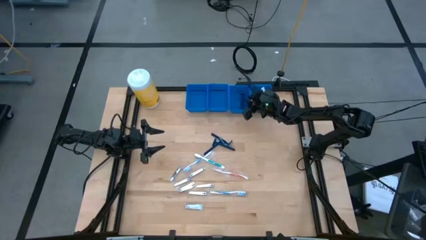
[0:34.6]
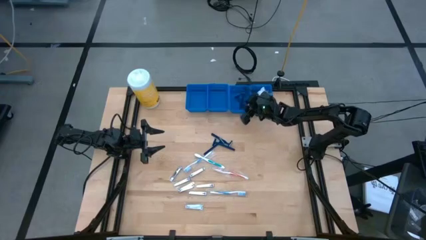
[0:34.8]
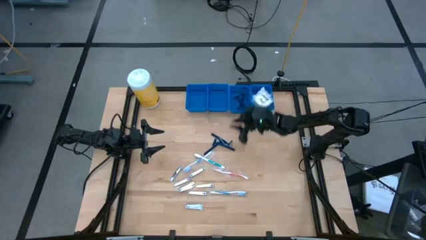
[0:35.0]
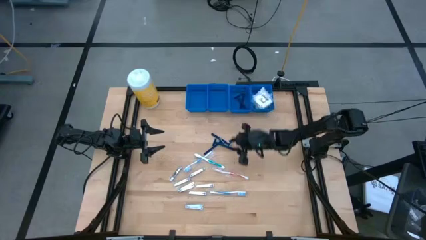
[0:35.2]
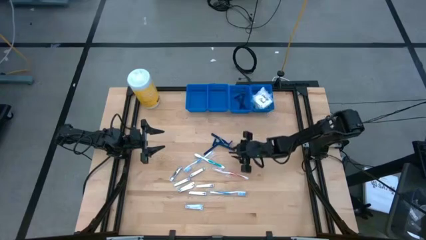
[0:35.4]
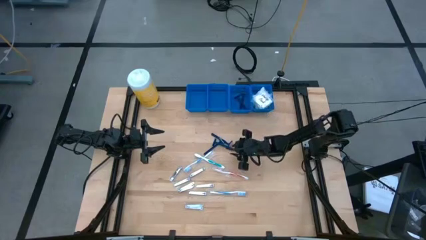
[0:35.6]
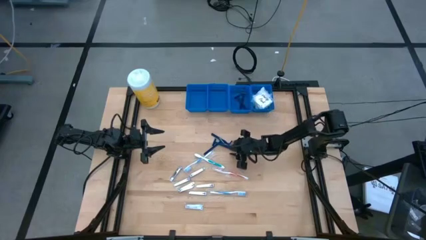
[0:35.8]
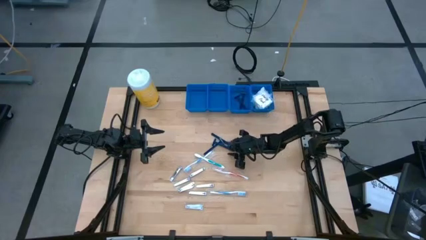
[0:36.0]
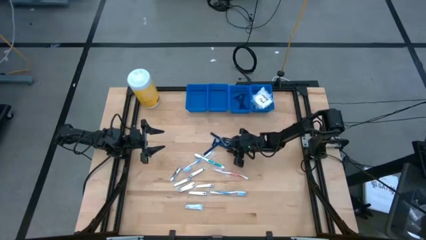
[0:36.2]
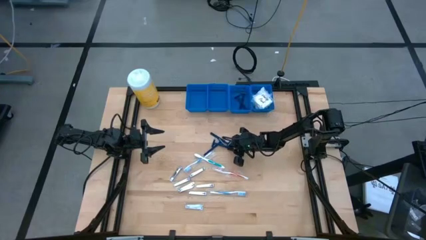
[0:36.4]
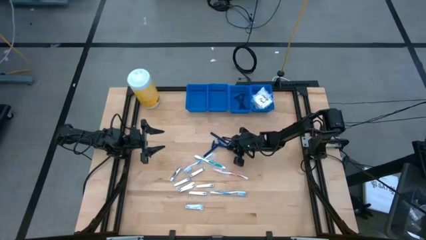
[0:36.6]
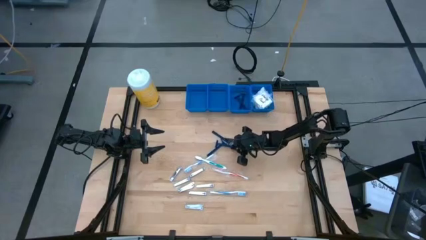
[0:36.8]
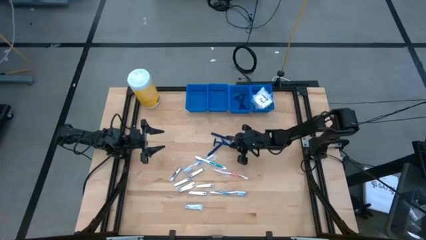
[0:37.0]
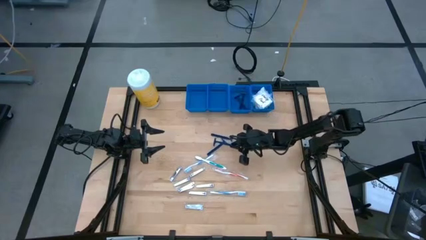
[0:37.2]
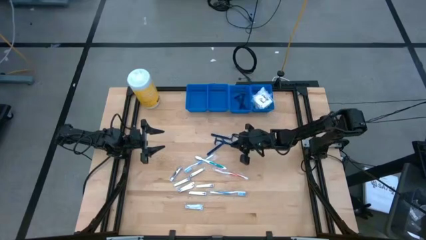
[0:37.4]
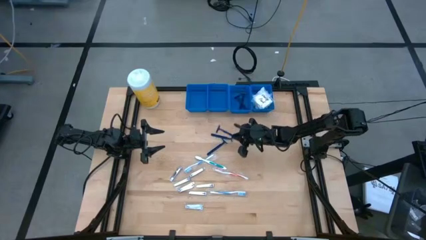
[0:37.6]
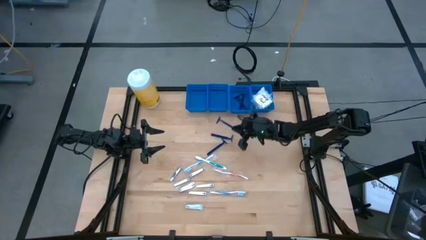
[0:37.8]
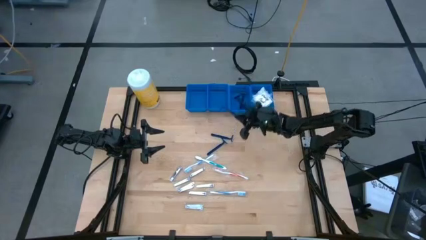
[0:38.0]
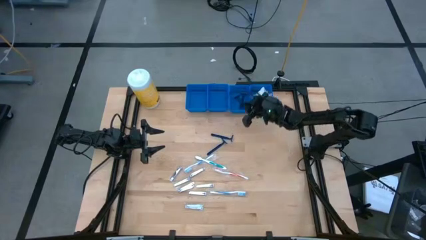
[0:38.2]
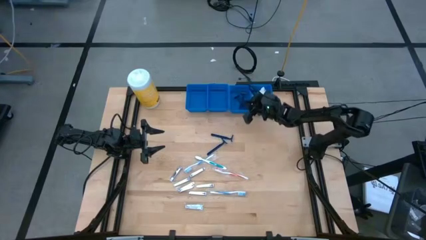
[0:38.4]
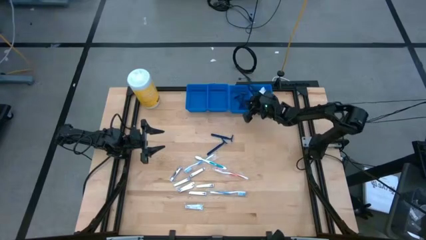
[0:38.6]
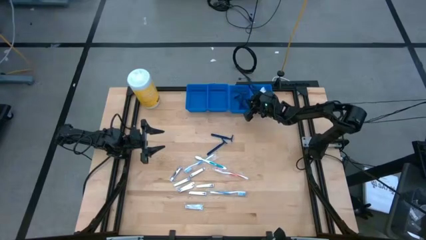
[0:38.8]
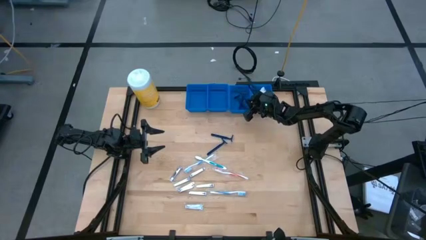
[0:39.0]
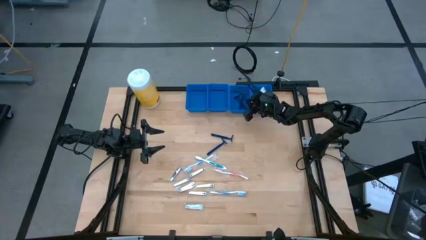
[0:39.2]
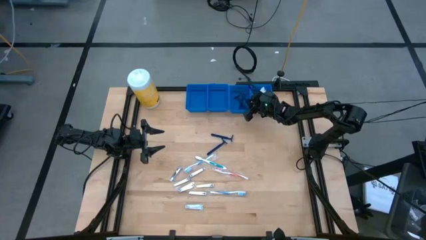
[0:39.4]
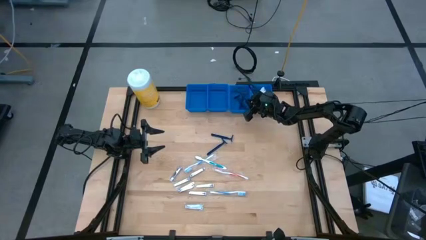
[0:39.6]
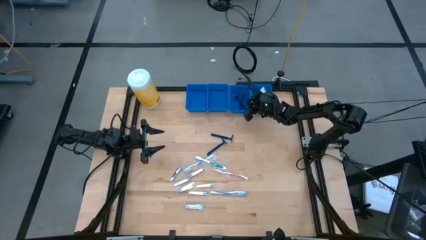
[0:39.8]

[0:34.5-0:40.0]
Task: Pick & Place Travel size toiletries
Put the blue razor into the middle right blue basket

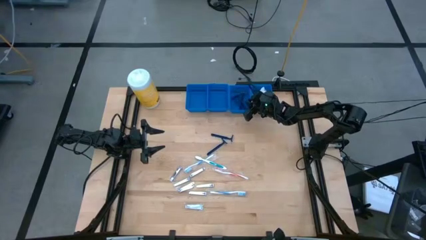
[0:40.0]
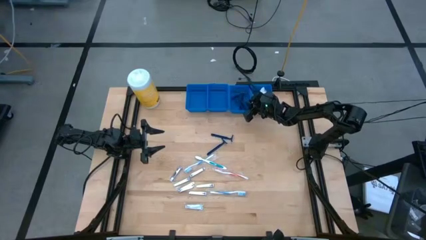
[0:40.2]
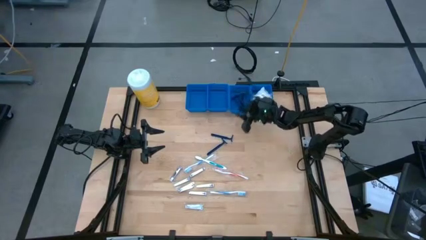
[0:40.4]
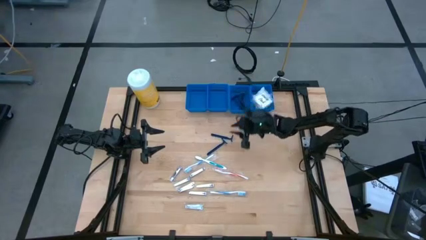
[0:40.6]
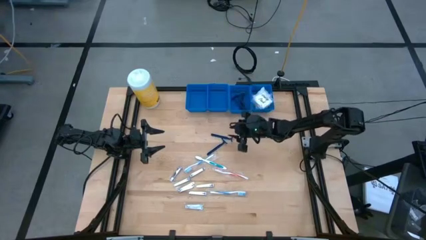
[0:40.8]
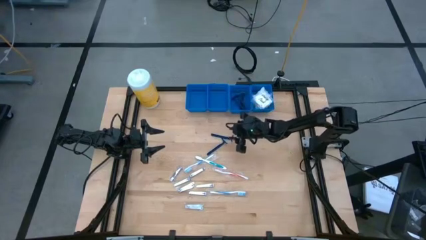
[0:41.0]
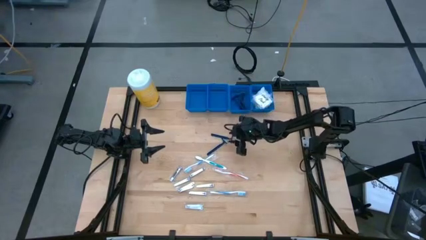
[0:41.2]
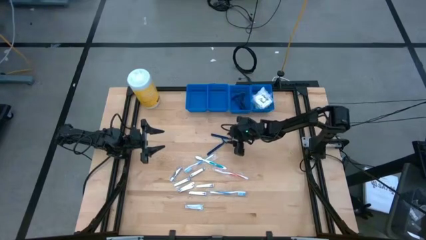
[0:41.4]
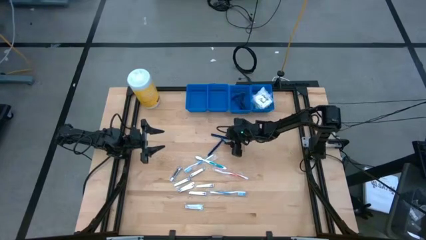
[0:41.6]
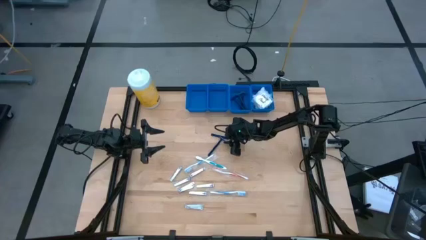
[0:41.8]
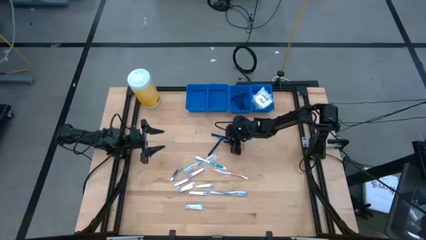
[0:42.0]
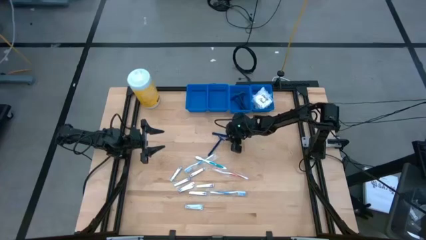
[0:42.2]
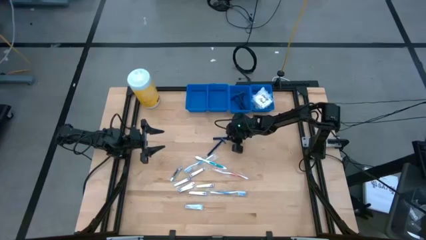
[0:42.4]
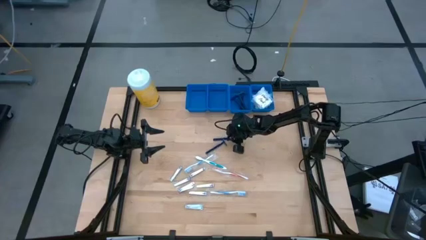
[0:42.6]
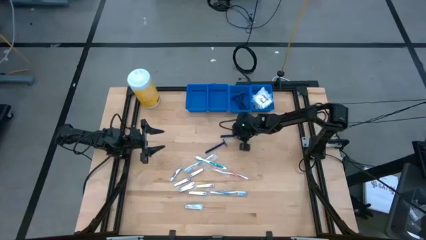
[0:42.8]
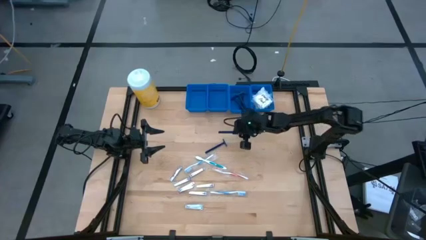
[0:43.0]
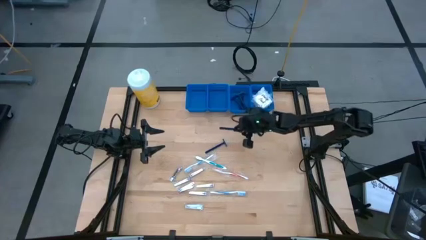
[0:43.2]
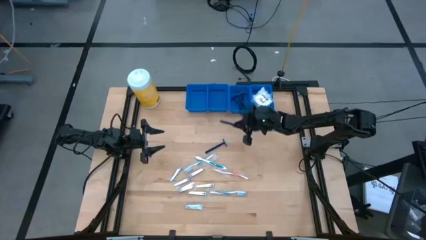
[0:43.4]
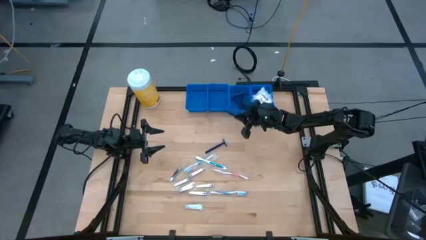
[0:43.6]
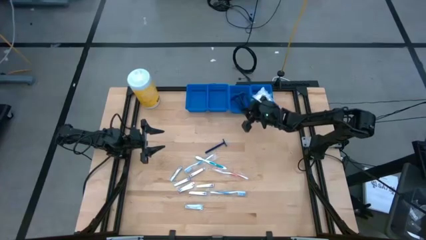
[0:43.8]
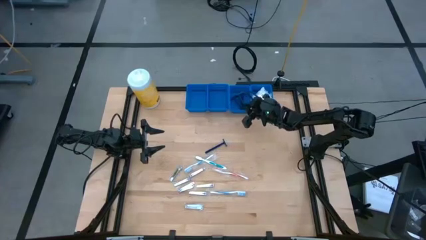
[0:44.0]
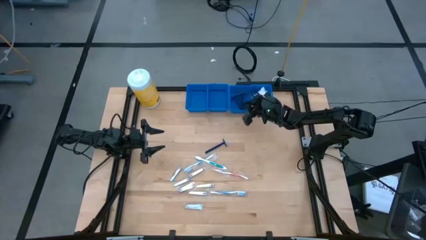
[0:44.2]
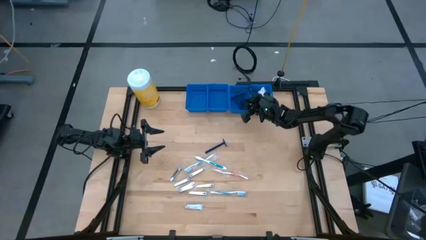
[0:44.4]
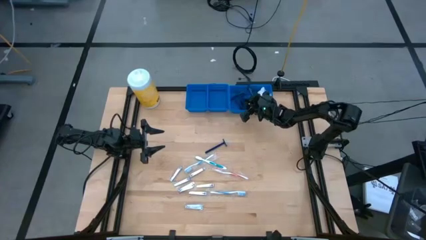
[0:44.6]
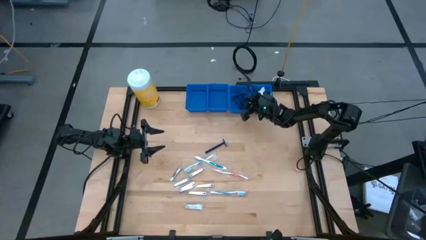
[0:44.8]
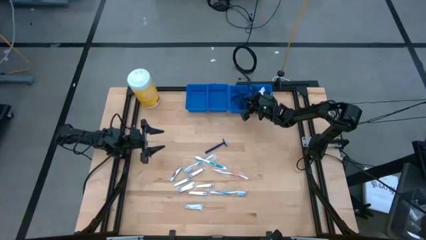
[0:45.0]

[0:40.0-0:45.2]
Put the blue razor into the middle right blue basket

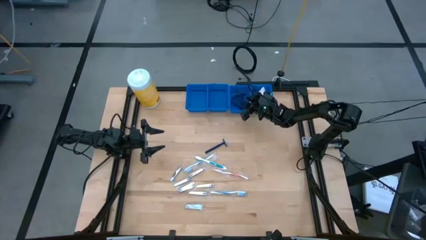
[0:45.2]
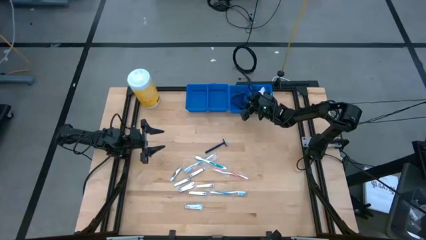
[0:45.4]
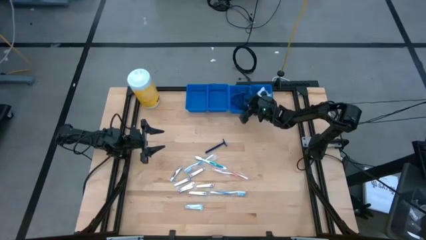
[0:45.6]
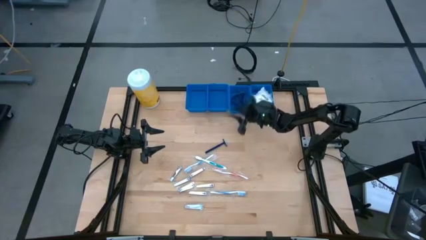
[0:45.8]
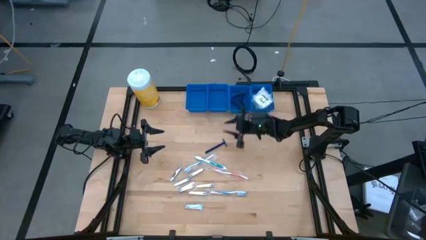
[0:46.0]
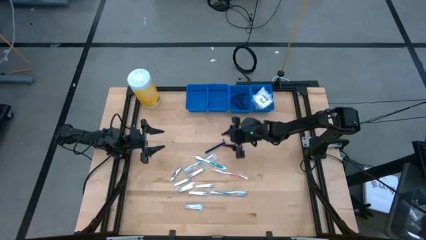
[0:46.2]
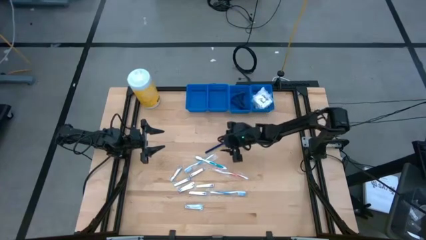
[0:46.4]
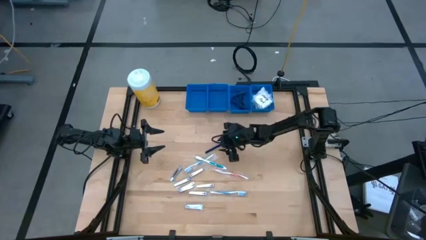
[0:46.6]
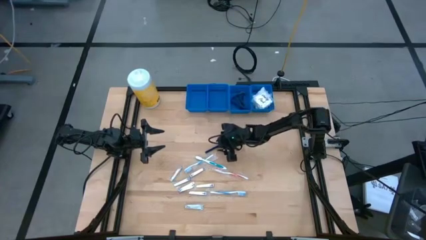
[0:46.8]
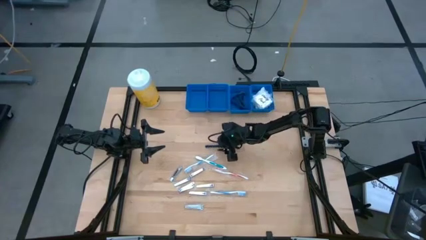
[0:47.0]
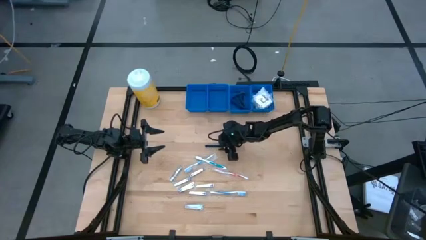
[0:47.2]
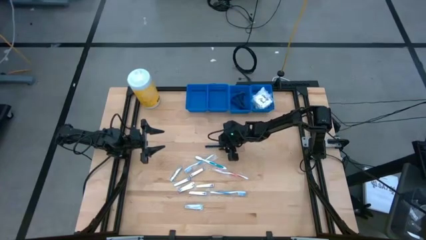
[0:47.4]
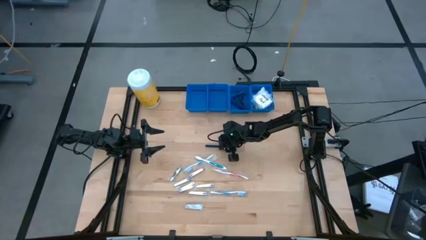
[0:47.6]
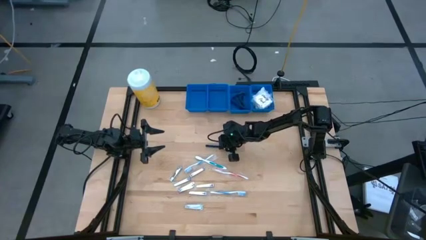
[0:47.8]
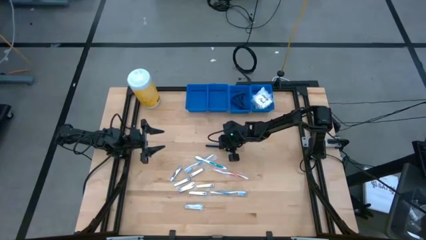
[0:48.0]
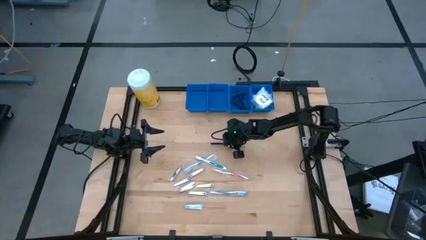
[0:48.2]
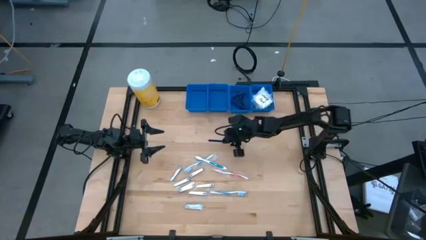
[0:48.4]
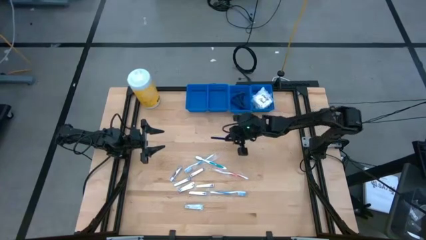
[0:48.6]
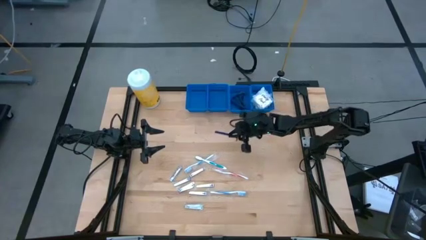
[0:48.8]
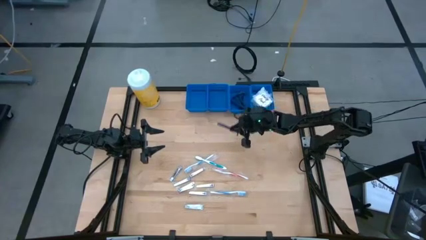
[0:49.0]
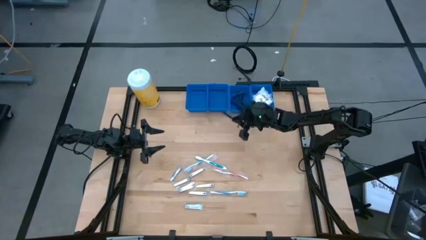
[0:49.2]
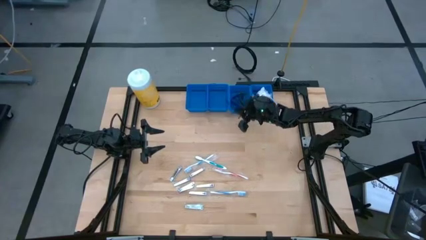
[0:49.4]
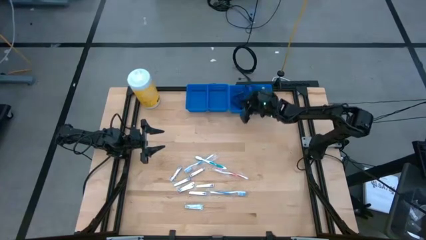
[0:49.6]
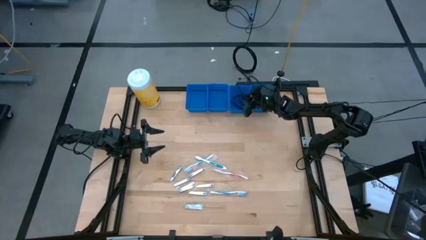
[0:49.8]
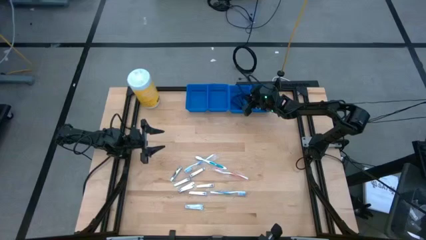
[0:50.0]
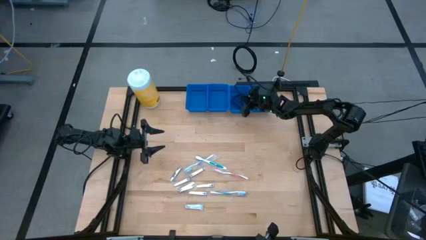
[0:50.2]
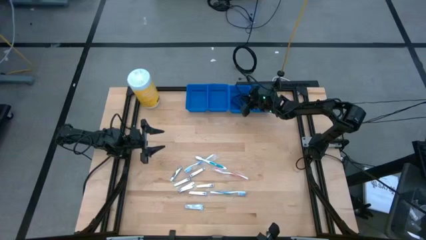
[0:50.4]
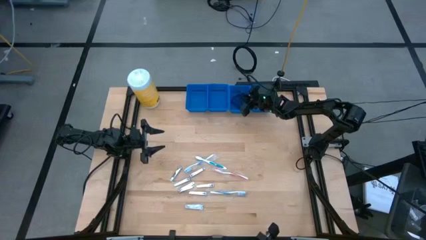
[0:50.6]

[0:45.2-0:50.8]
Put the blue razor into the middle right blue basket

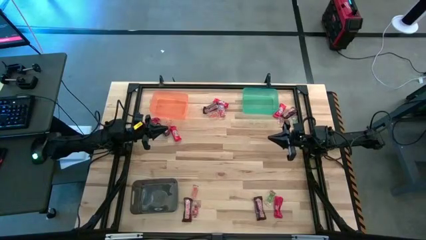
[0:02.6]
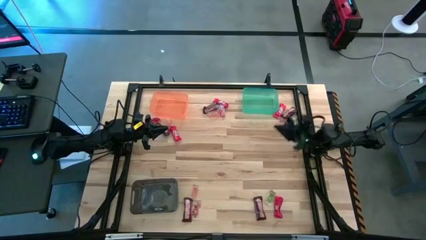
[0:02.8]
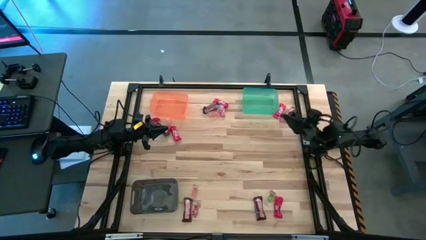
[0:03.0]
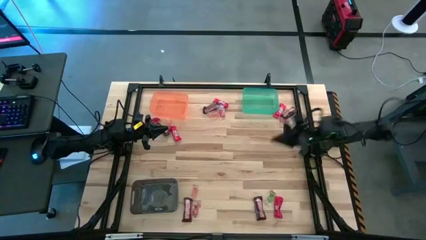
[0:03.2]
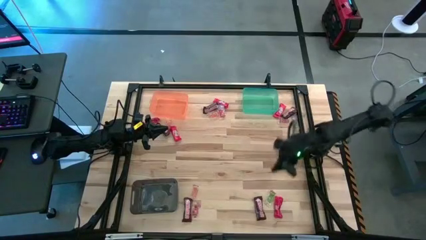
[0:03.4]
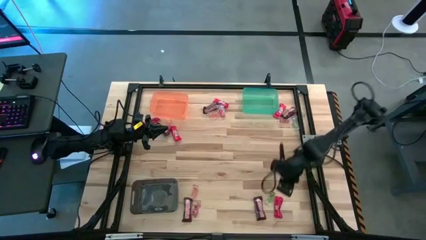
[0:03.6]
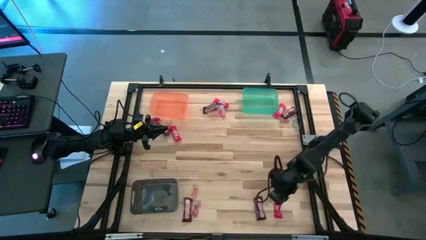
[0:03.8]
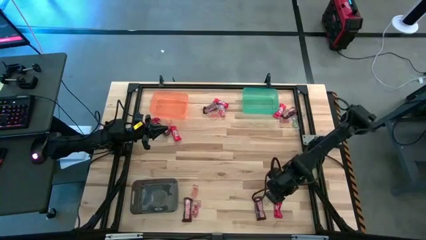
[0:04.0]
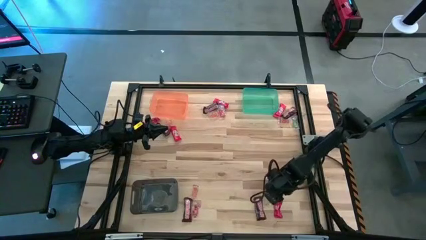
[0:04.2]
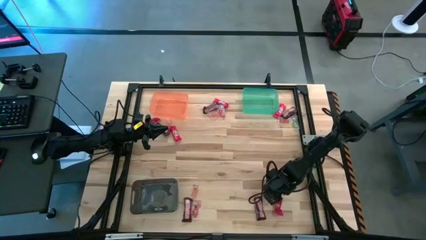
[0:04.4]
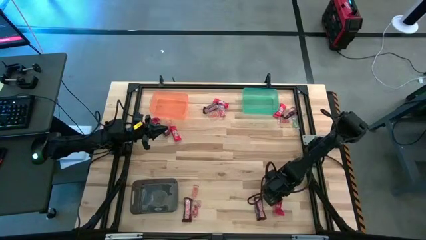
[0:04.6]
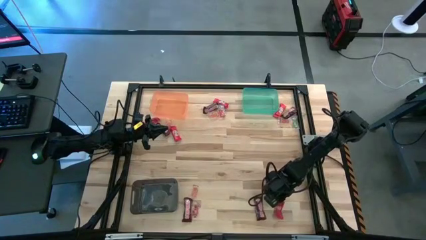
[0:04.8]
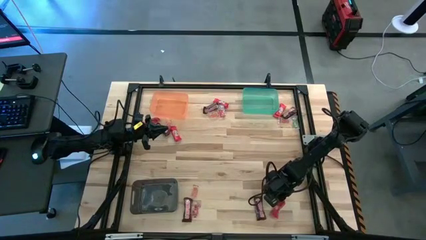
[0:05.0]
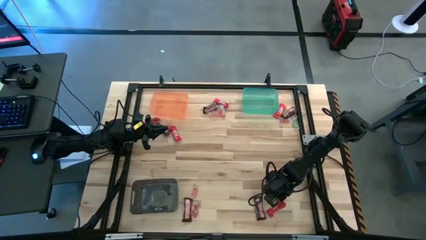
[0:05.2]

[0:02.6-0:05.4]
Task: Sort candy by brand, put in halloween buckets
Put the red chocolate bar into the blue bin
